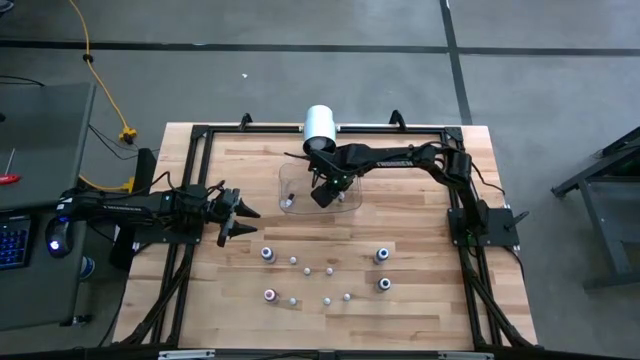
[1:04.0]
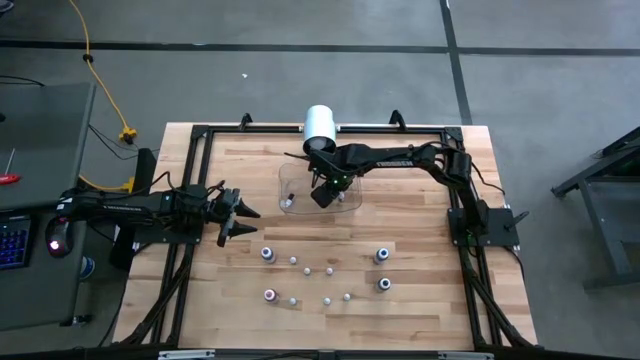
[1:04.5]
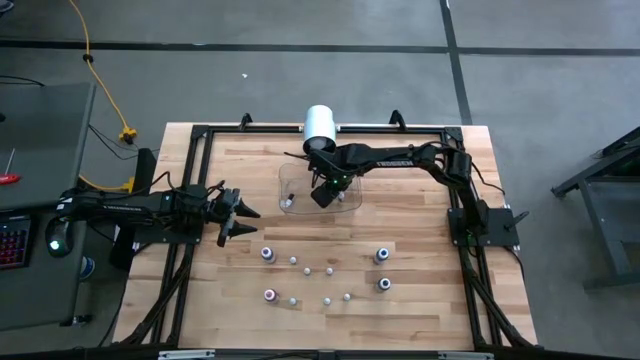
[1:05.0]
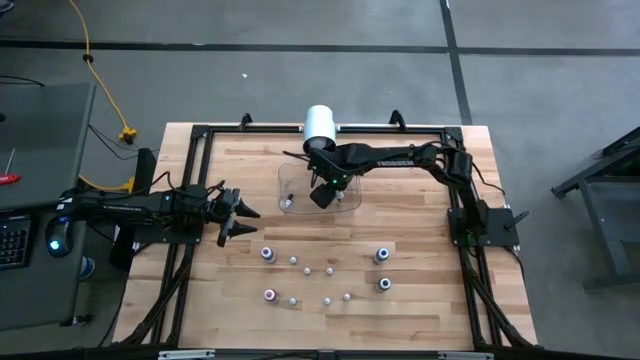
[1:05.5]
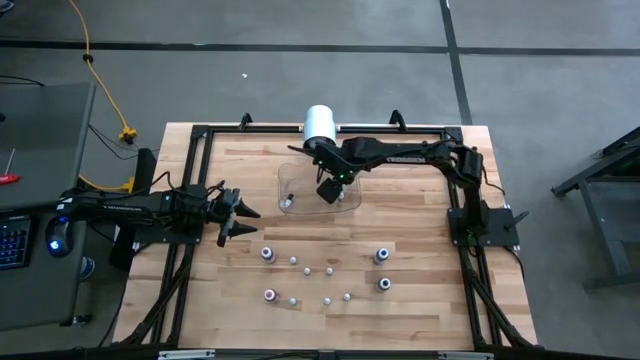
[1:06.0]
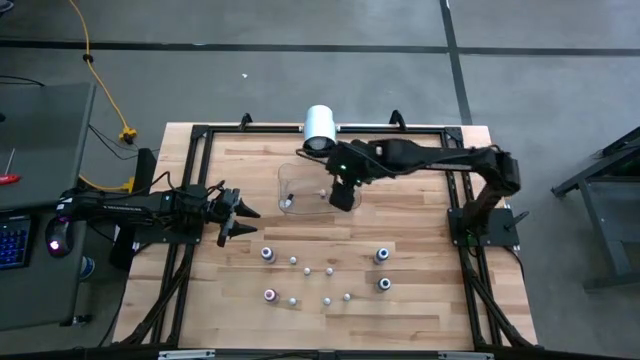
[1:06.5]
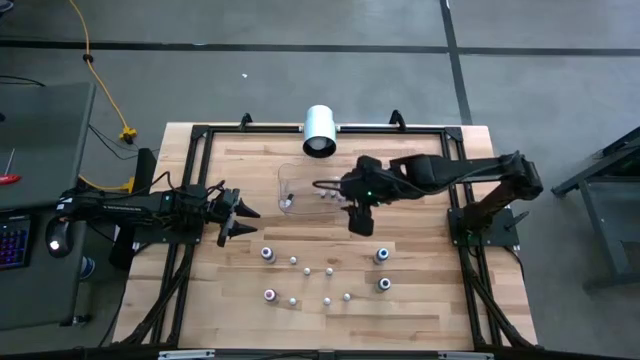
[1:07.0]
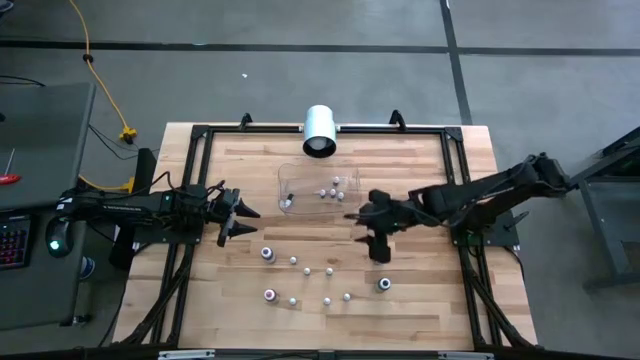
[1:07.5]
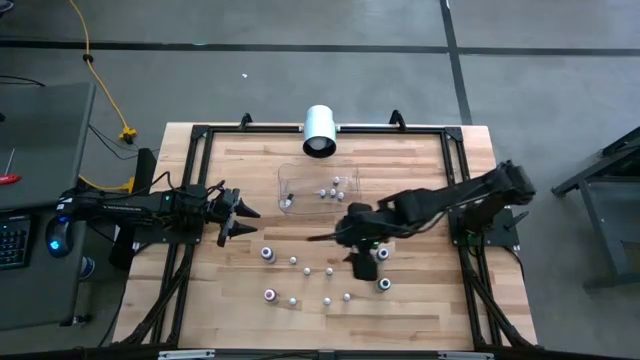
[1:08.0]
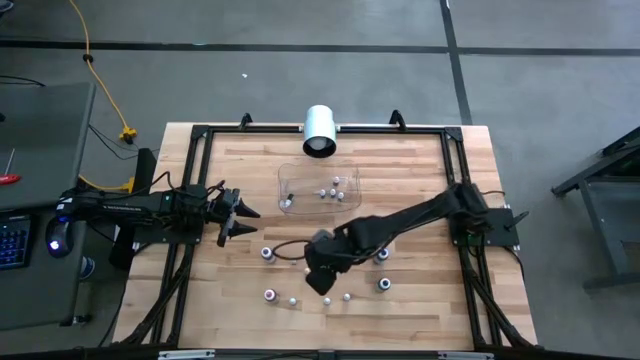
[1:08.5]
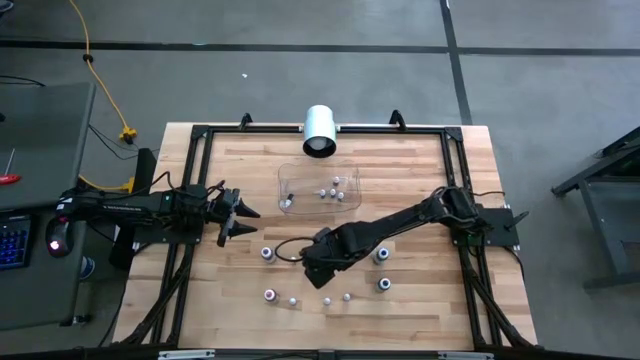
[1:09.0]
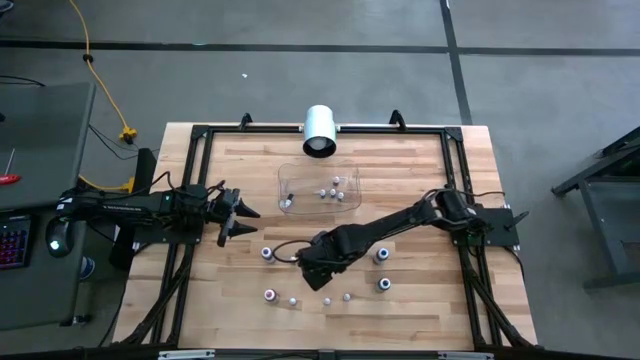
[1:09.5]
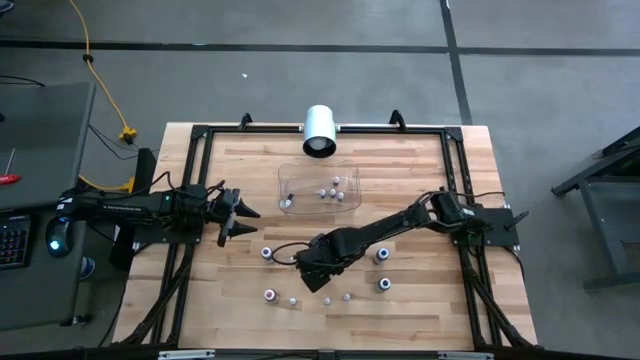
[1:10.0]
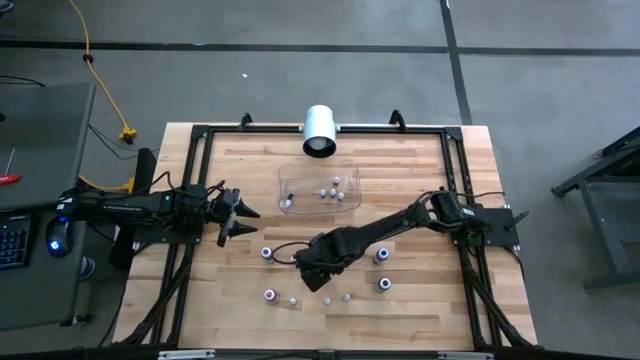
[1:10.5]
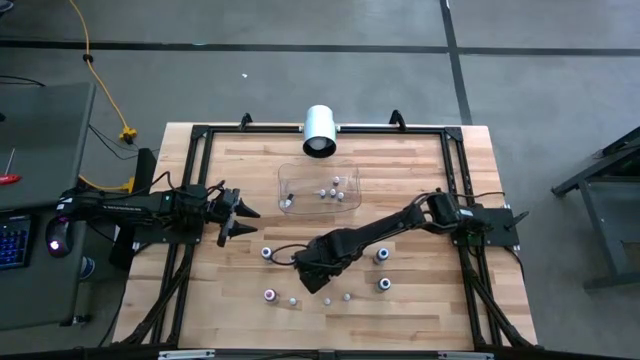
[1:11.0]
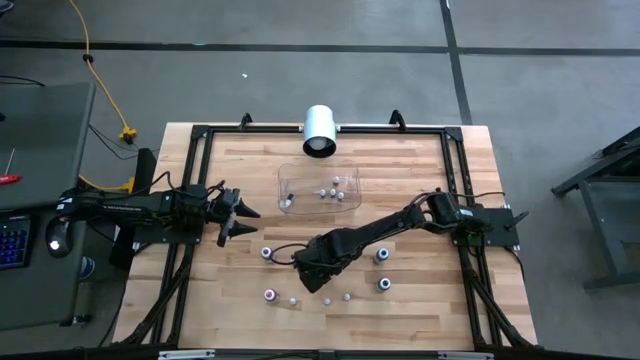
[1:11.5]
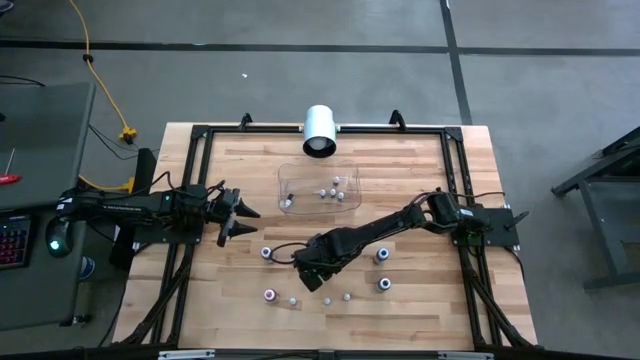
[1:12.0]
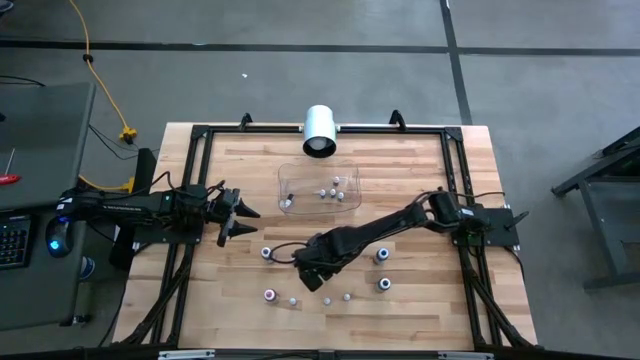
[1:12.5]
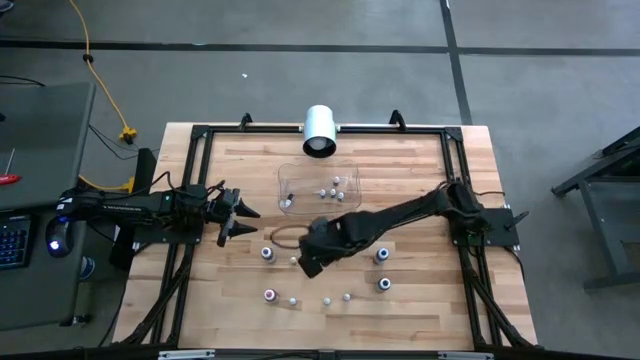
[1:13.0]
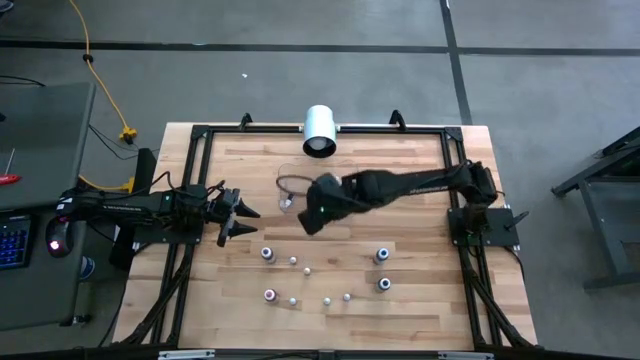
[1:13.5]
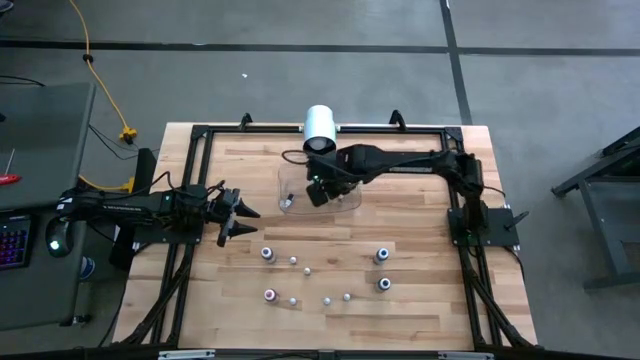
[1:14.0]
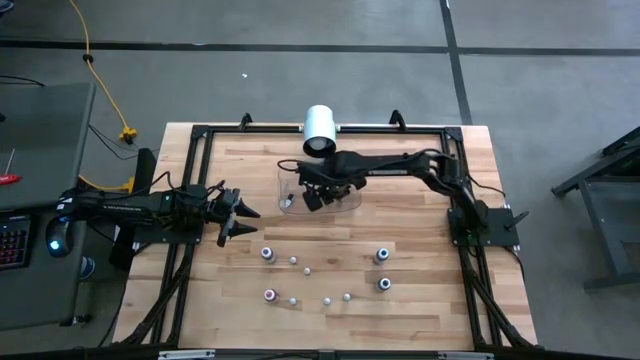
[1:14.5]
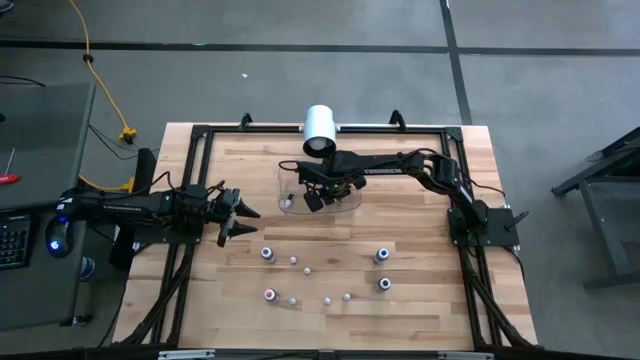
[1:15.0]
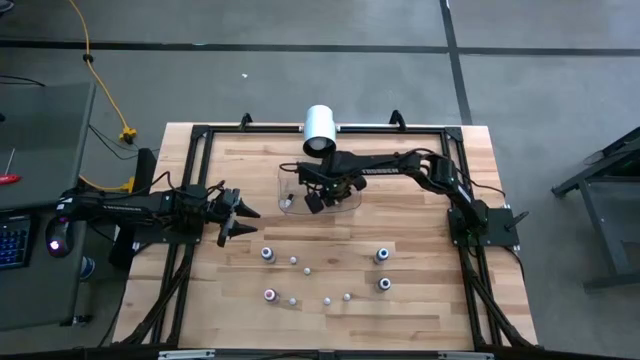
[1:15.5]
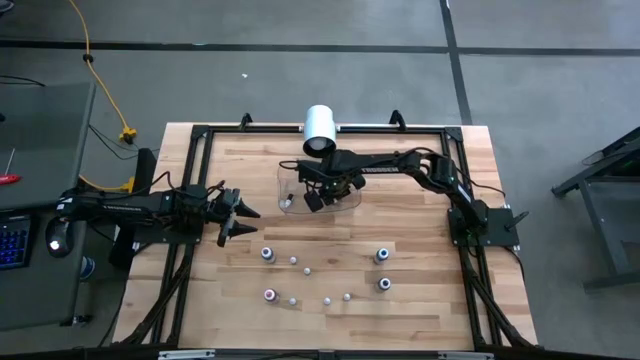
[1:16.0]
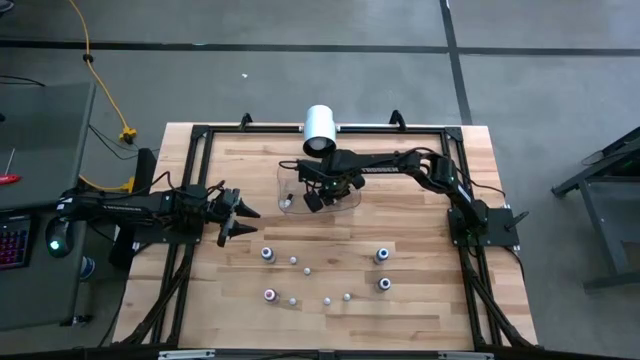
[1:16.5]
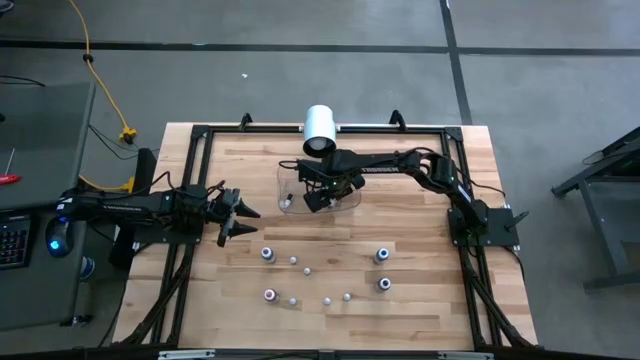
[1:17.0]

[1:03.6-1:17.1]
Task: Pick & Place food coloring
Put the small black food coloring bottle into the transparent bin

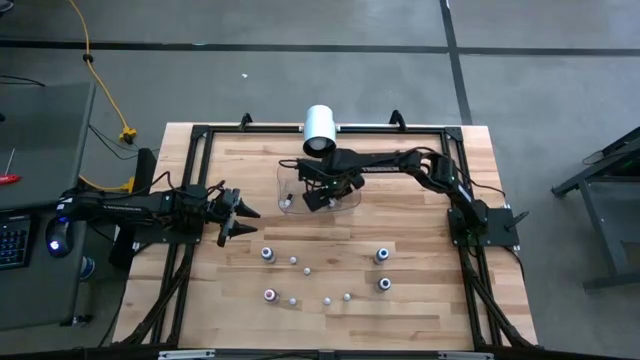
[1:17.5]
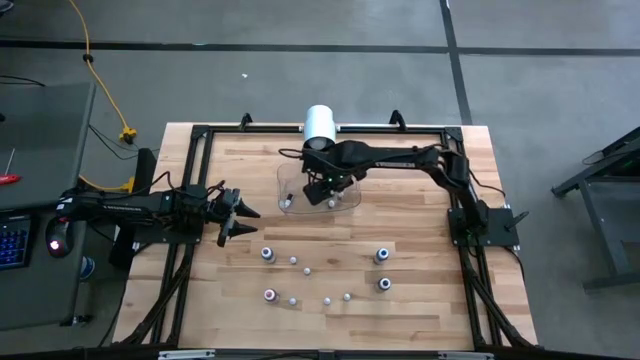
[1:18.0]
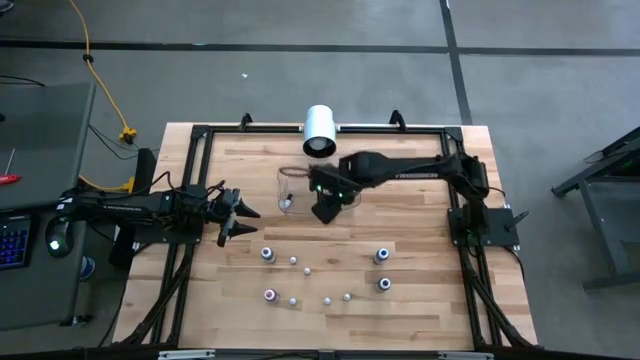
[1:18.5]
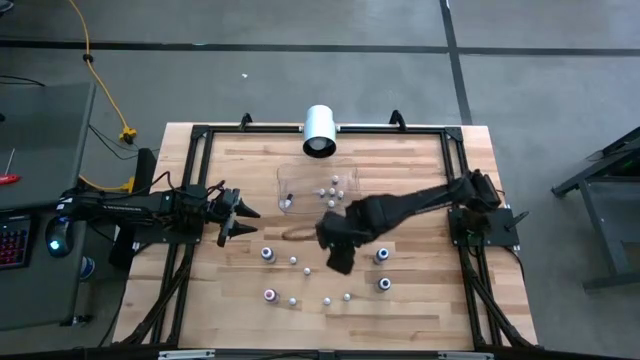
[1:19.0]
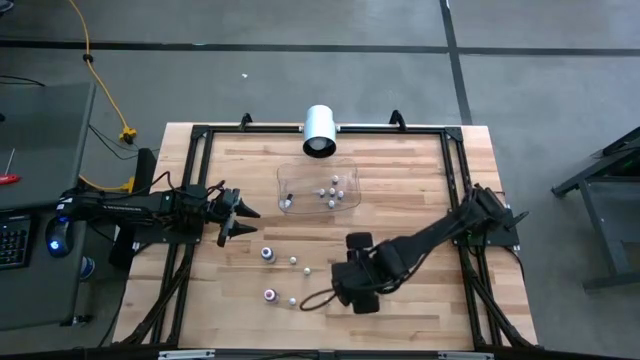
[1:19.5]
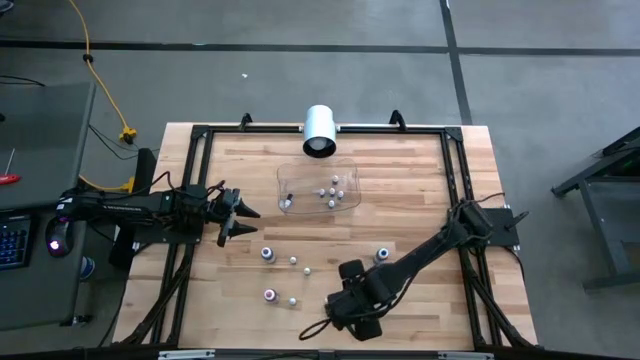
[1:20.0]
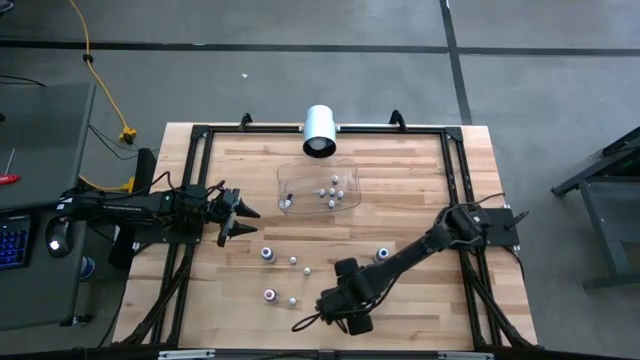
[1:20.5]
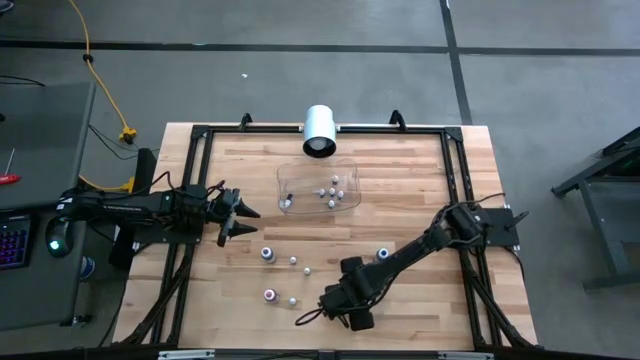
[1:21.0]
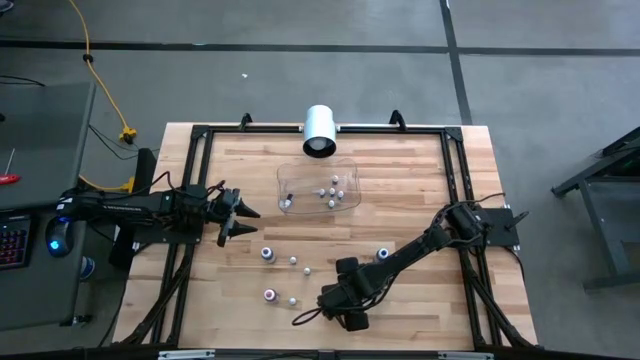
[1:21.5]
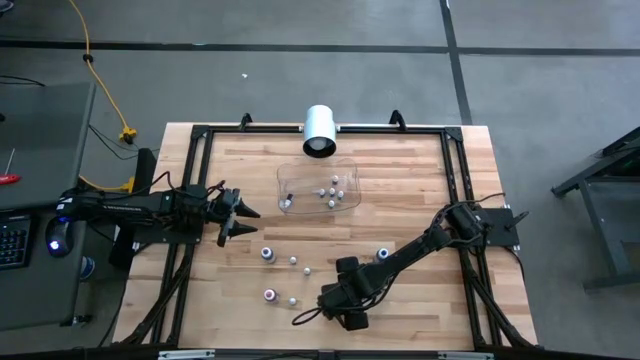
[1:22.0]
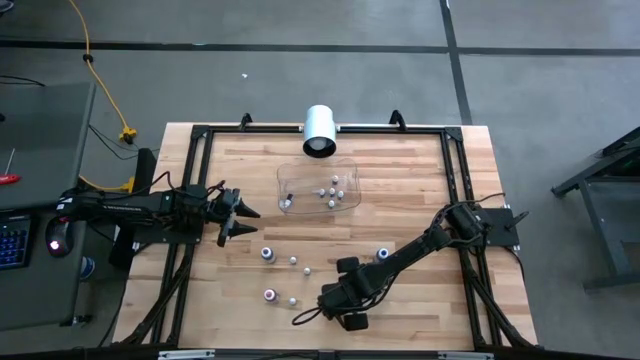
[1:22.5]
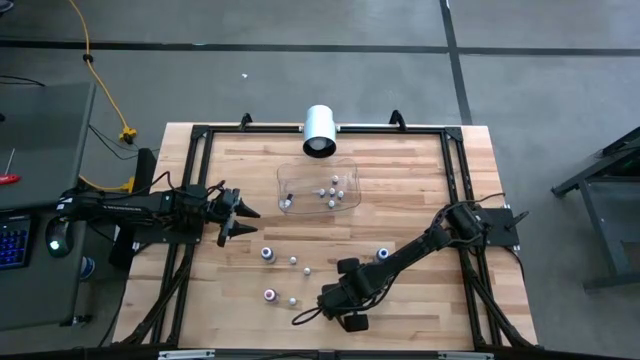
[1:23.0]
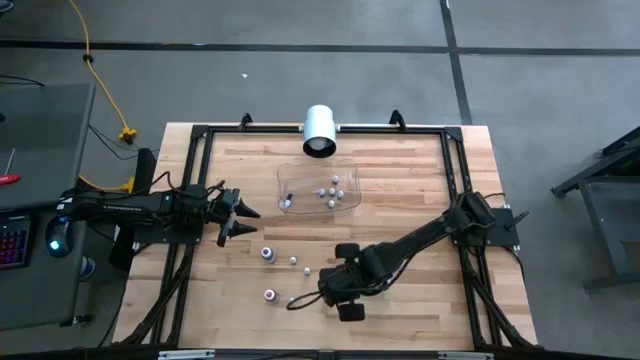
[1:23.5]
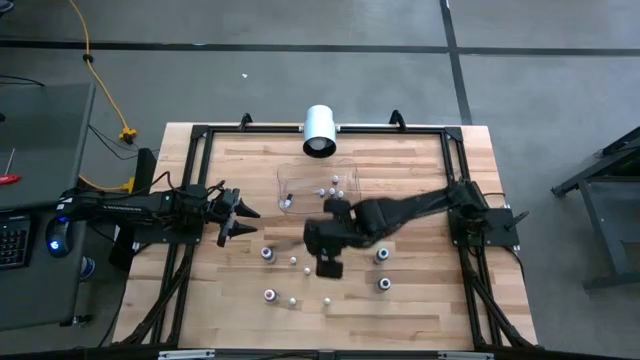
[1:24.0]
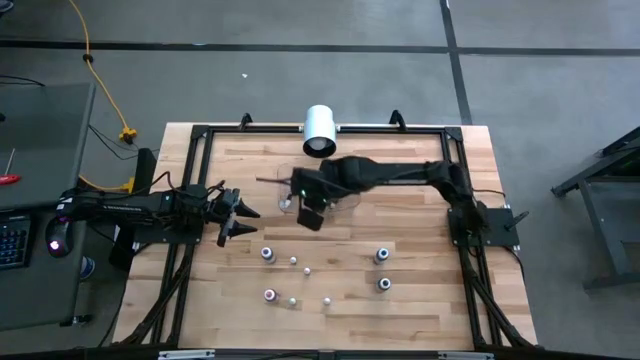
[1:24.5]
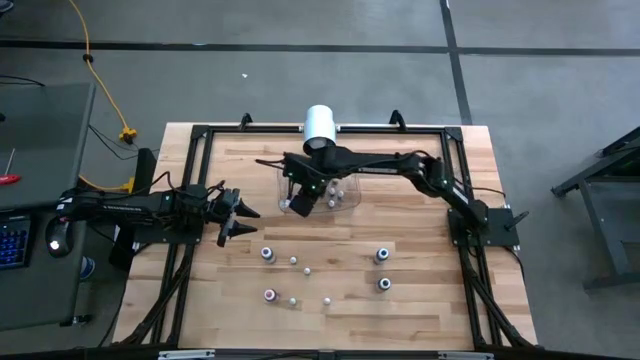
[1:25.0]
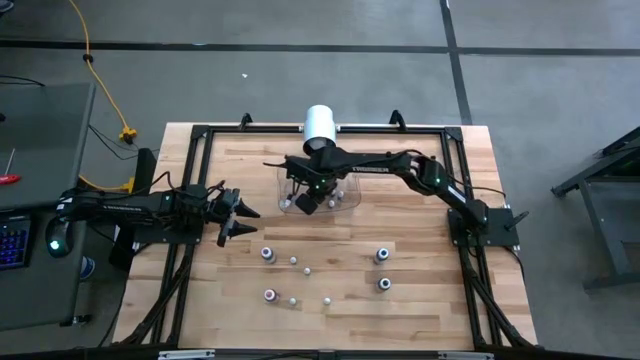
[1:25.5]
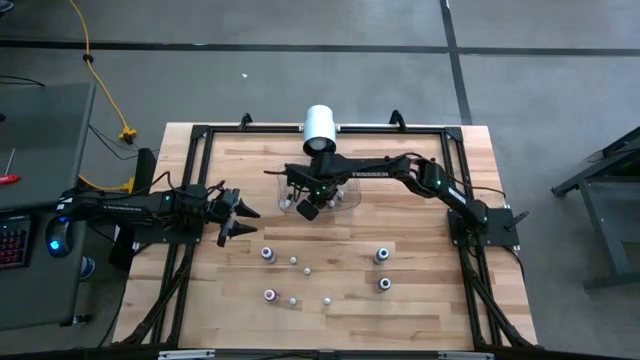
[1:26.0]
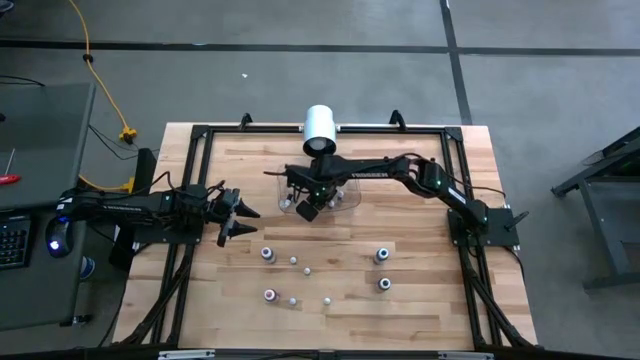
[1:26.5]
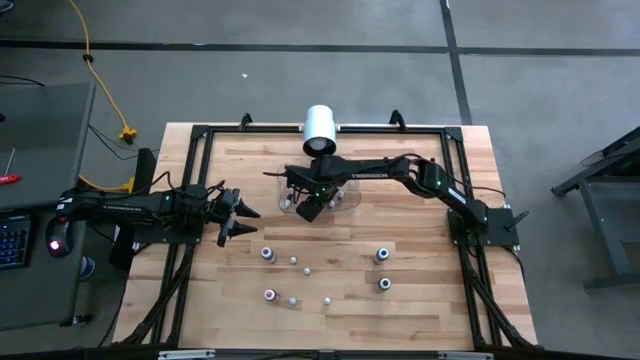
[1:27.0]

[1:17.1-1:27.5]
Put the small black food coloring bottle into the transparent bin
